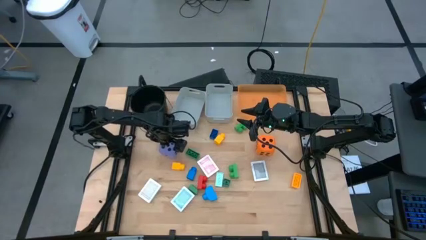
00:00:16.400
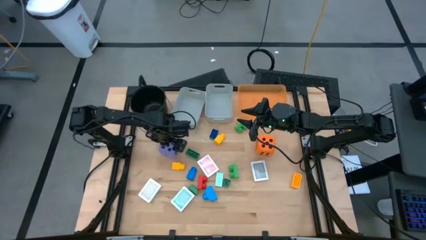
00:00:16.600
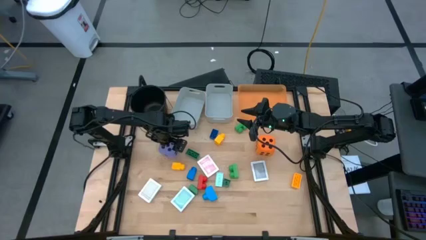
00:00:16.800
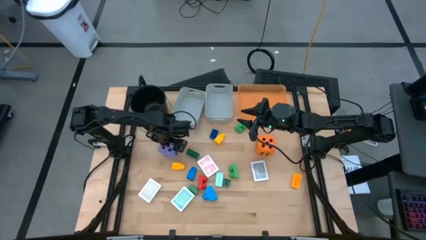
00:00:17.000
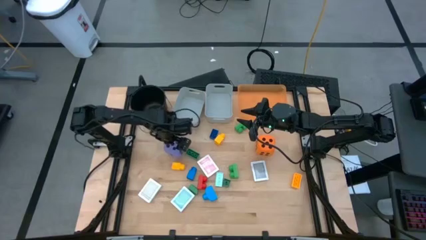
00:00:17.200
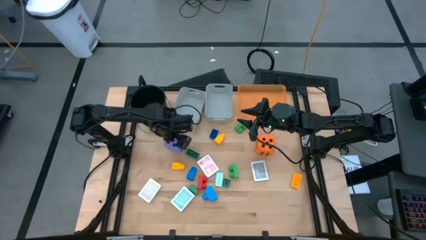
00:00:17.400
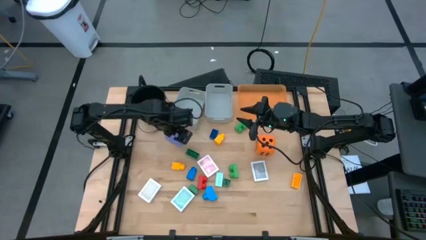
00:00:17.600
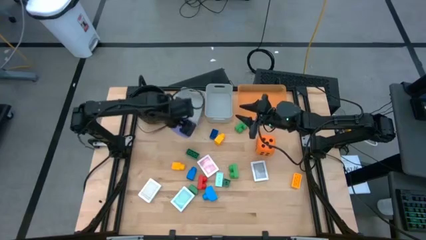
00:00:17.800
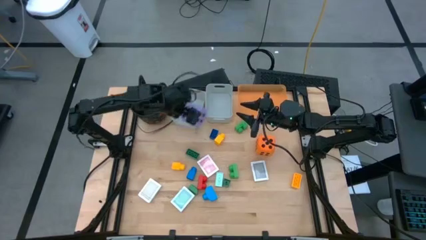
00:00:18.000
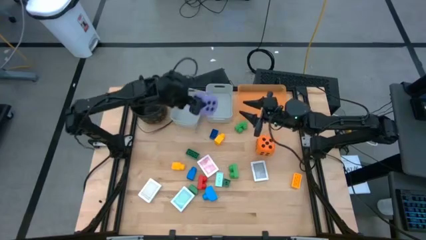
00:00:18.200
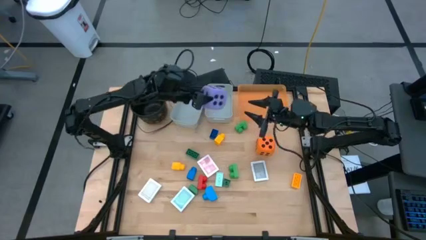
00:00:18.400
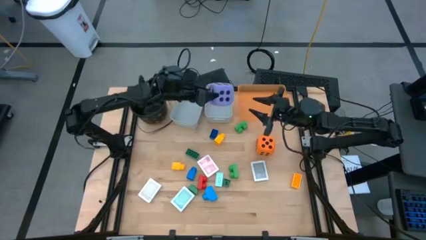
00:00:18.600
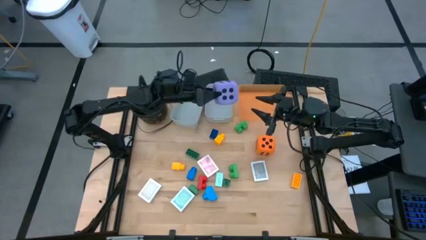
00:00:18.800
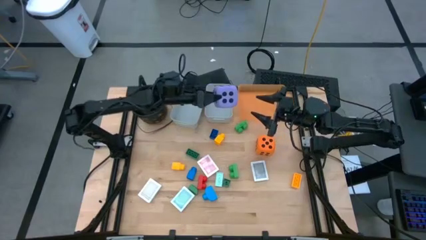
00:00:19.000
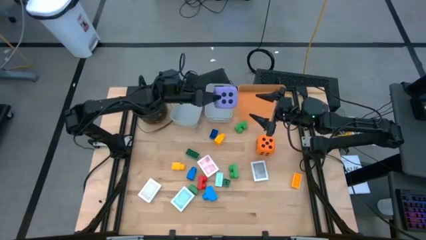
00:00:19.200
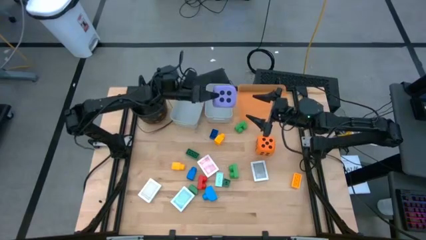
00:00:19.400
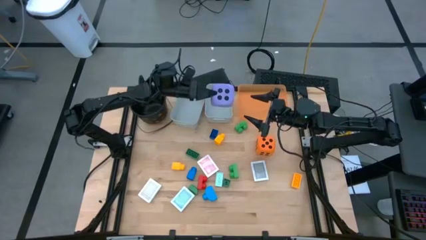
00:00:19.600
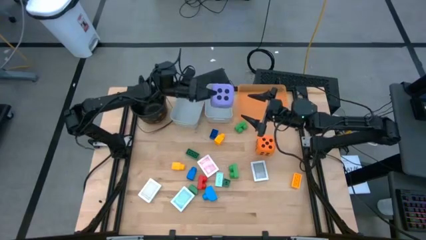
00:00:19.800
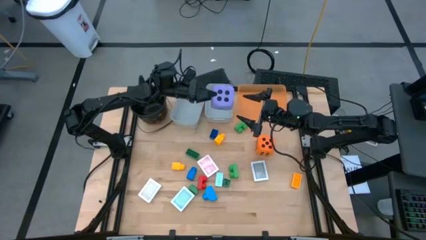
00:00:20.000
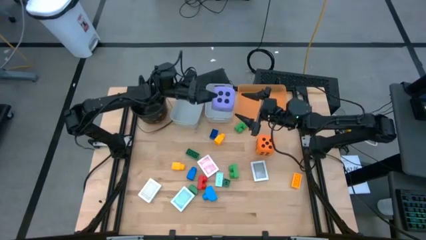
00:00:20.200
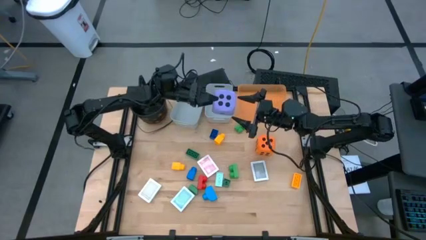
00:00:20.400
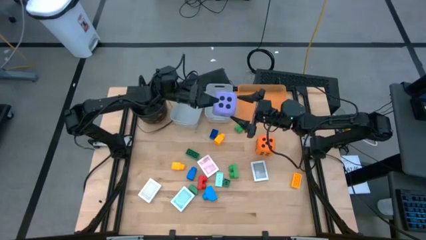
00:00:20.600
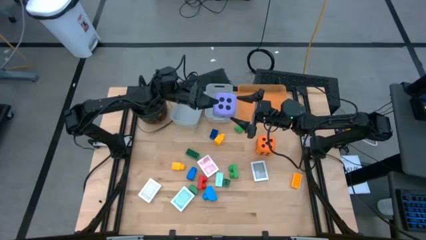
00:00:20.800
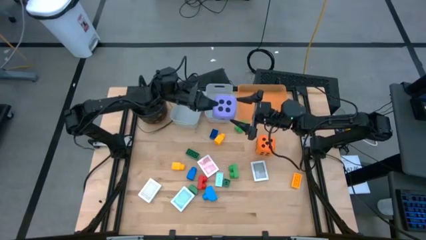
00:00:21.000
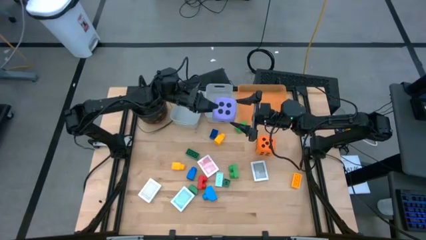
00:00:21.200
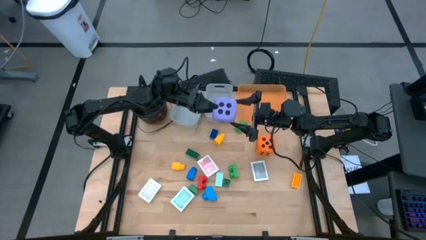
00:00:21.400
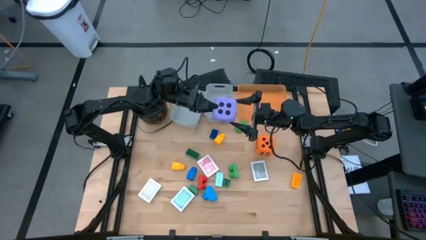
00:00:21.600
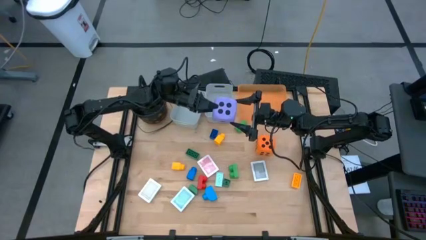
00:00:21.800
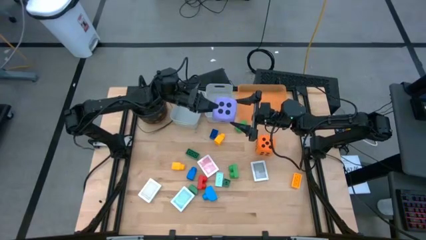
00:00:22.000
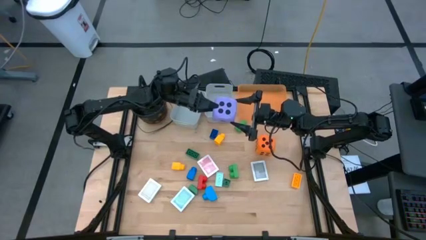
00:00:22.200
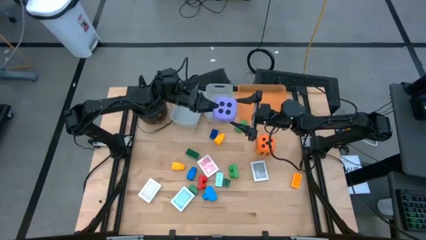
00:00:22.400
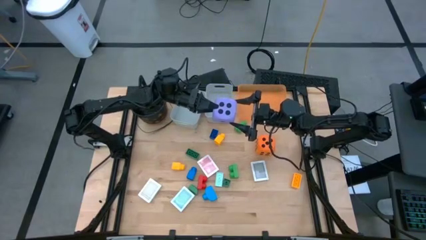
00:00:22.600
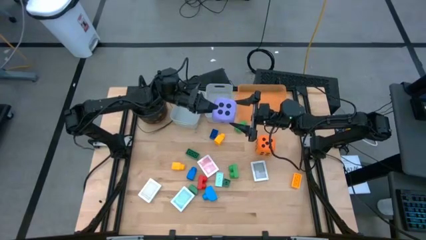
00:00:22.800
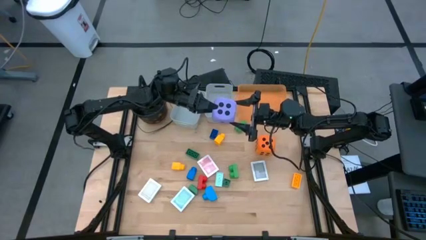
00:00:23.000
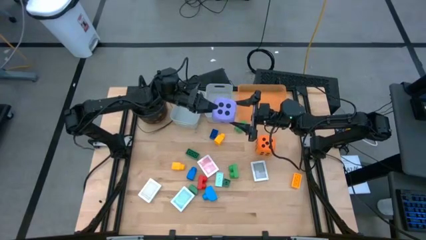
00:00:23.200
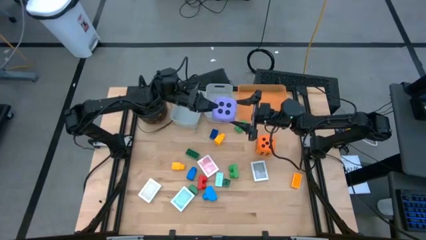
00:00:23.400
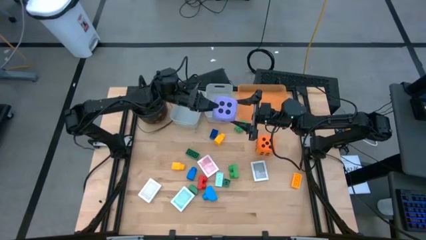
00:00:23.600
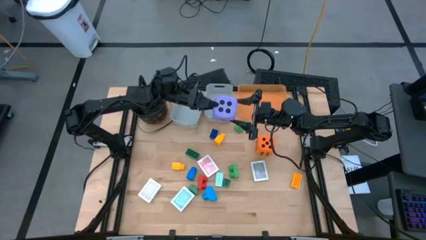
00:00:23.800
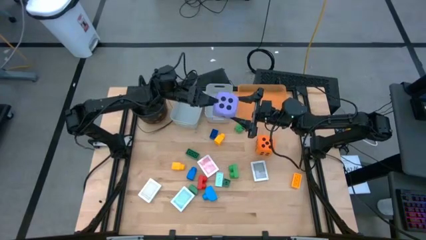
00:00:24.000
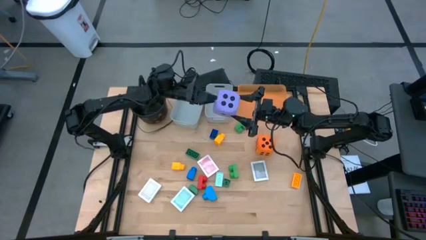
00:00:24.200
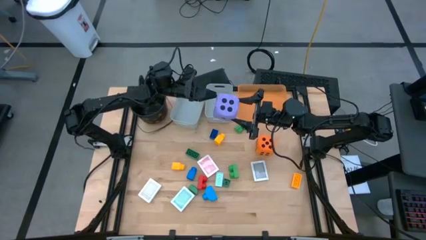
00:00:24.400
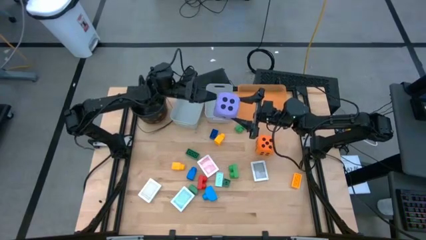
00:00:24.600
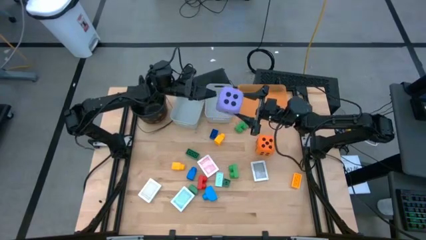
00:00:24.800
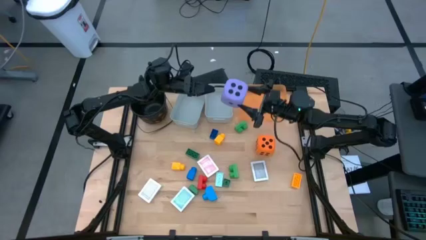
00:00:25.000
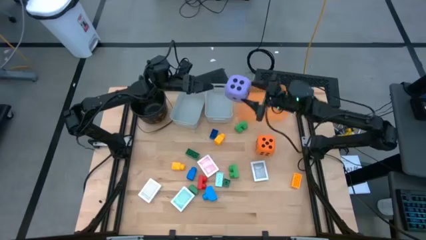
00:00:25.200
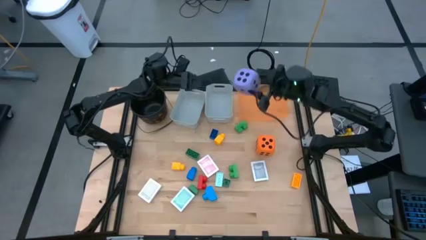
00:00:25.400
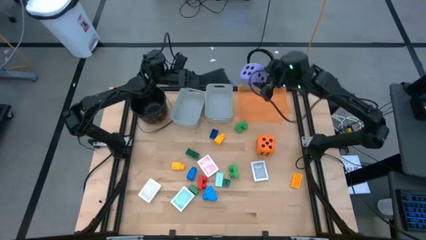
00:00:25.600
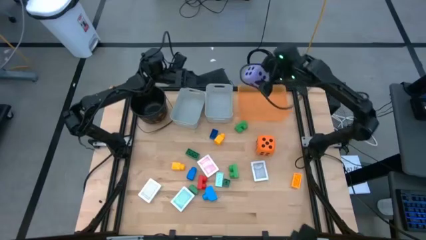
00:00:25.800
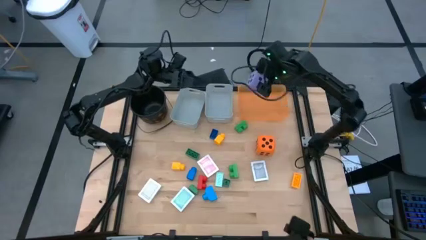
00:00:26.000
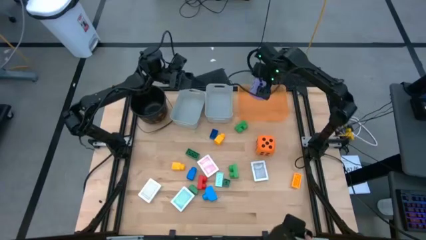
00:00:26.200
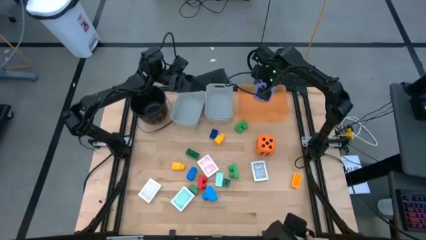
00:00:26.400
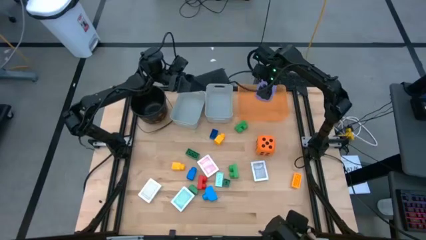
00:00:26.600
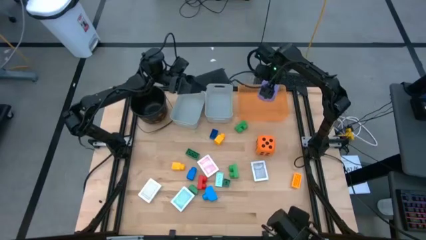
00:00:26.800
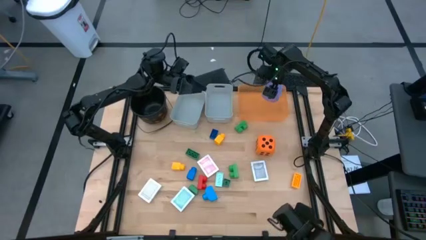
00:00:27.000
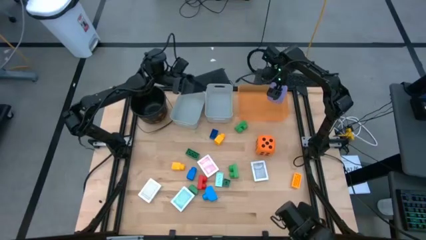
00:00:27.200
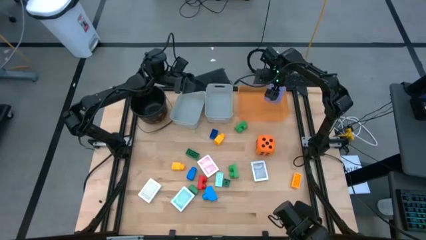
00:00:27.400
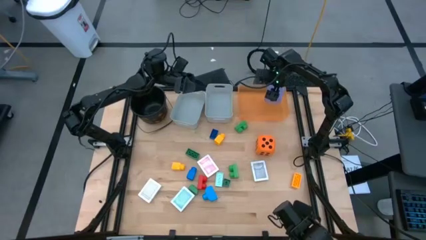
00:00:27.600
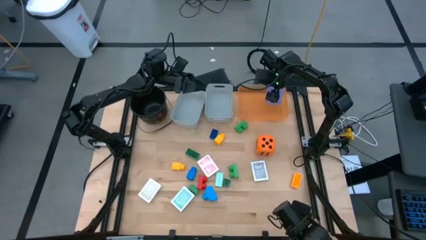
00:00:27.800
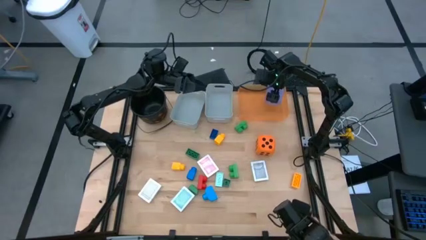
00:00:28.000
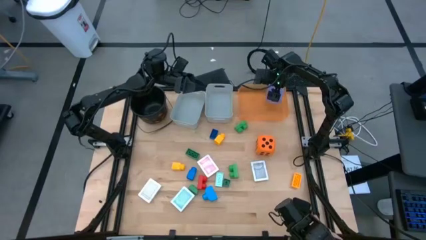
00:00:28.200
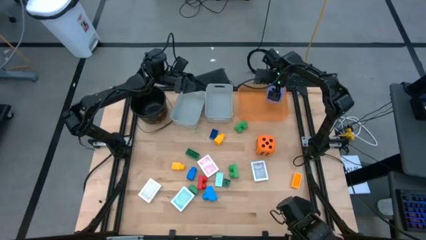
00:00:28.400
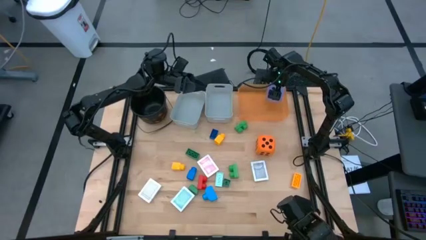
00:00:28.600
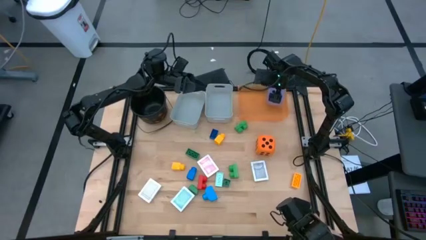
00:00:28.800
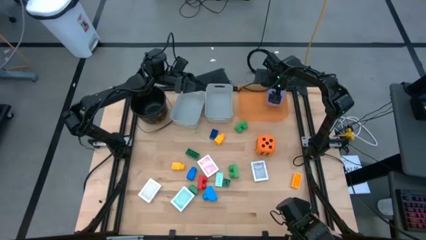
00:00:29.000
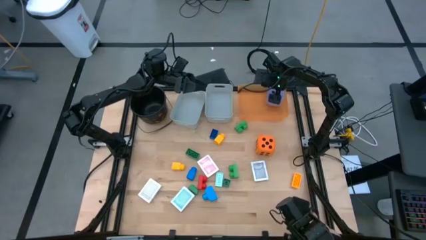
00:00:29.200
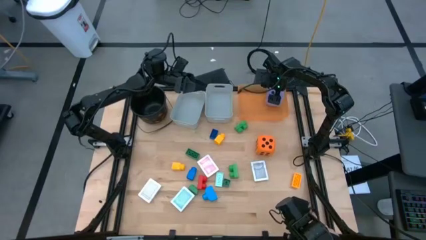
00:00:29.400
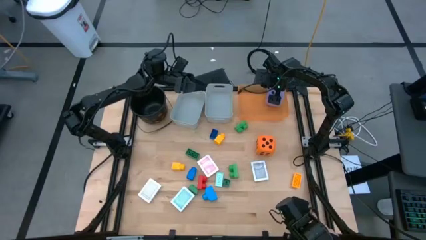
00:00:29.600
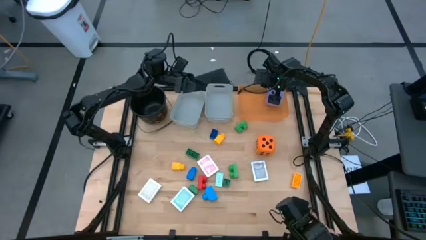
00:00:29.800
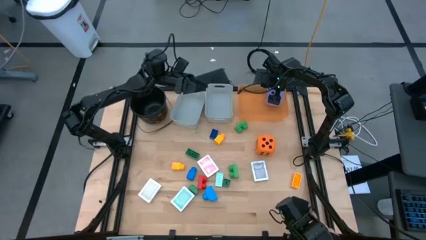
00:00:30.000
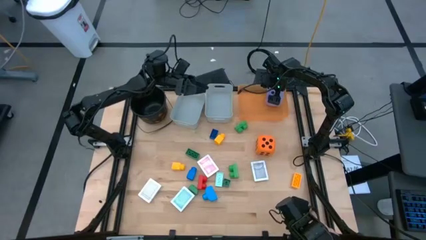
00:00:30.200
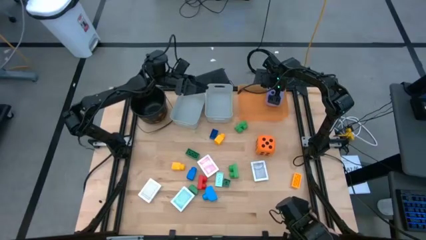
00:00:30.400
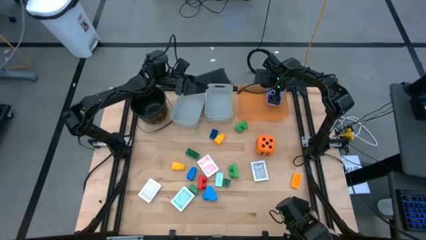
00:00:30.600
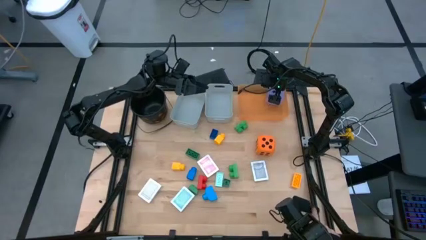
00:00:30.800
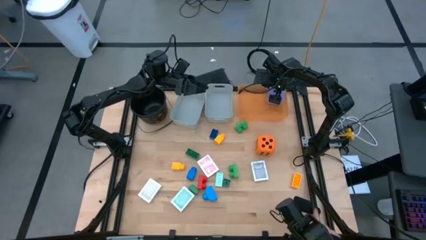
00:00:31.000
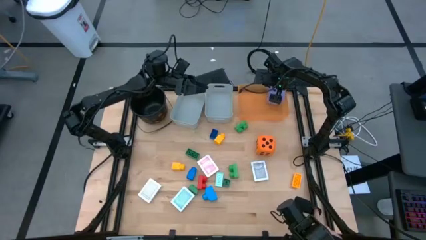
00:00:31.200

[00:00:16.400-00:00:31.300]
Task: Pick & Place Toys
Put the violet dice into the orange bin
